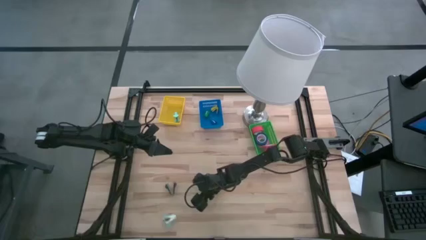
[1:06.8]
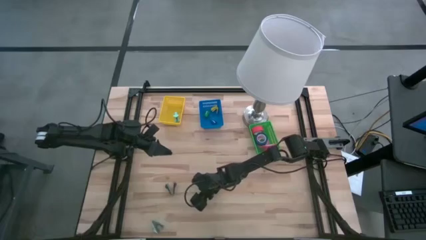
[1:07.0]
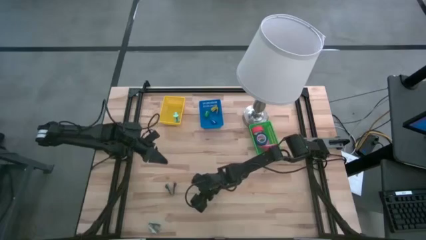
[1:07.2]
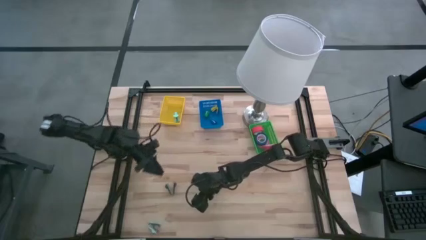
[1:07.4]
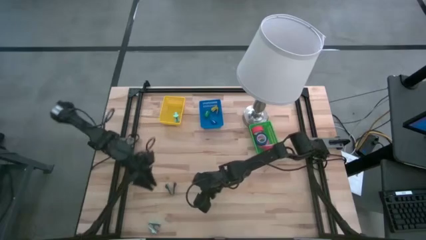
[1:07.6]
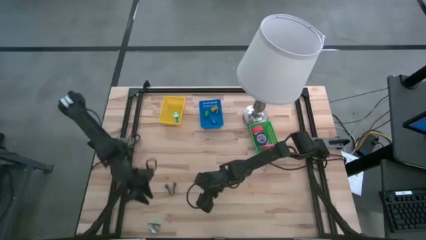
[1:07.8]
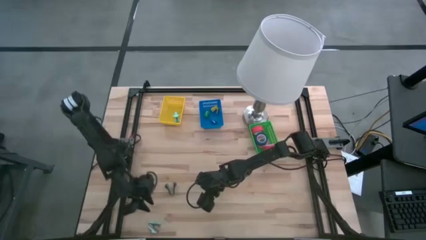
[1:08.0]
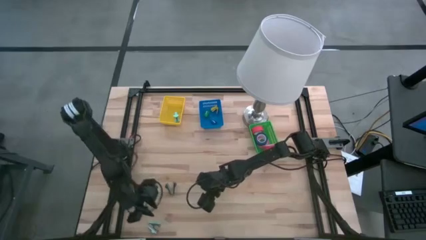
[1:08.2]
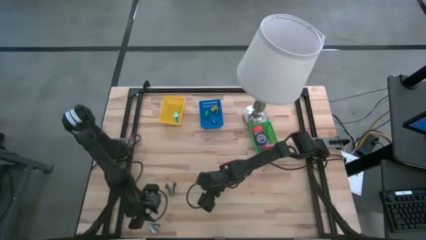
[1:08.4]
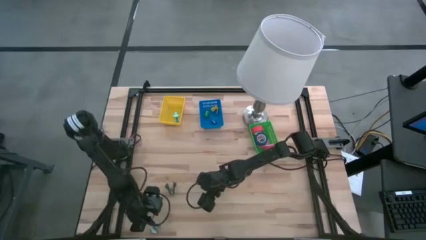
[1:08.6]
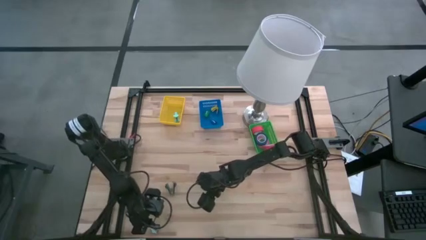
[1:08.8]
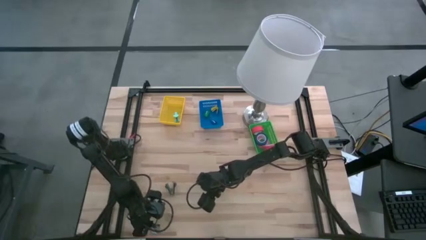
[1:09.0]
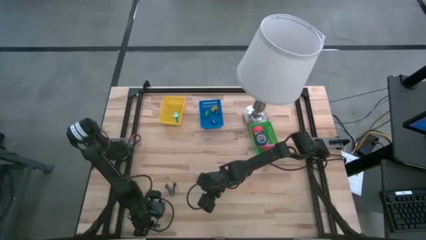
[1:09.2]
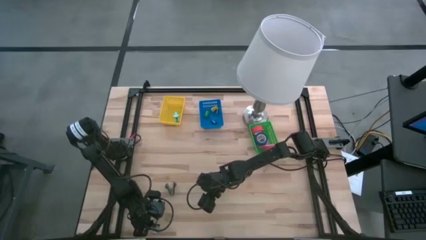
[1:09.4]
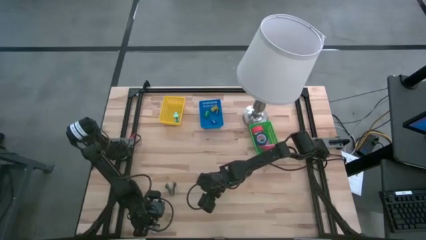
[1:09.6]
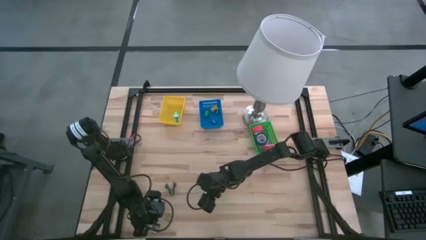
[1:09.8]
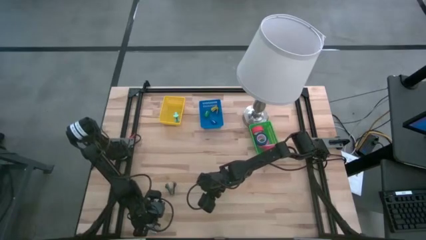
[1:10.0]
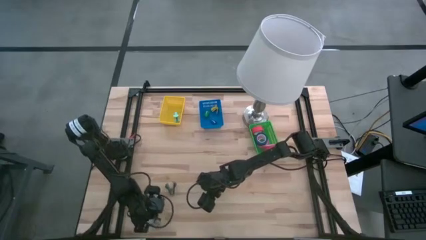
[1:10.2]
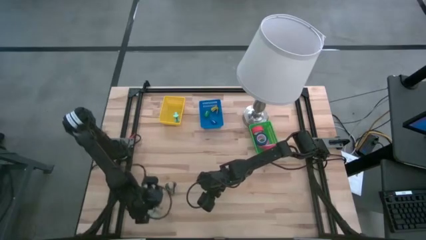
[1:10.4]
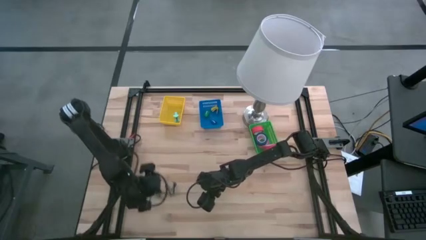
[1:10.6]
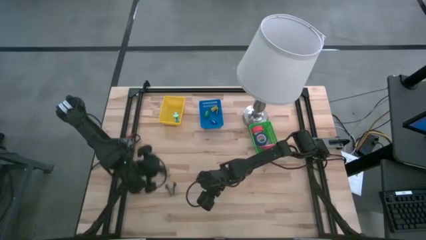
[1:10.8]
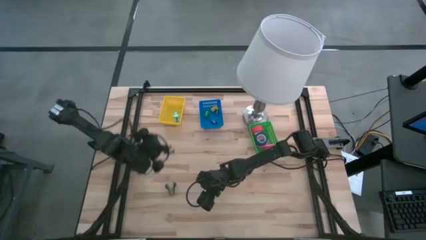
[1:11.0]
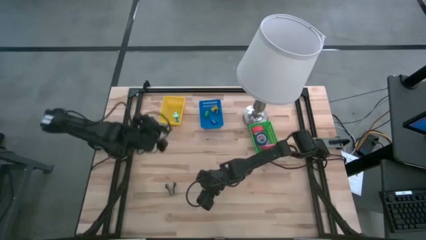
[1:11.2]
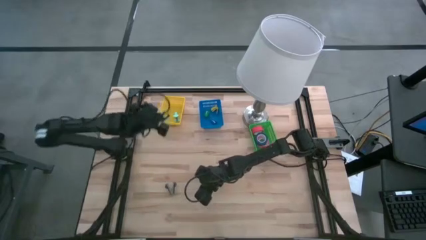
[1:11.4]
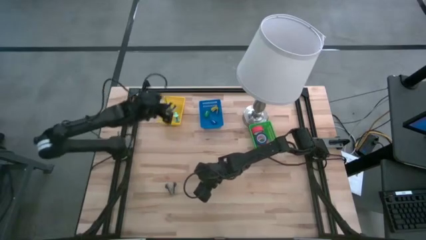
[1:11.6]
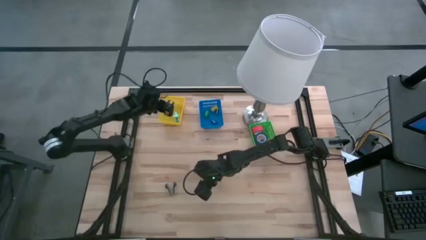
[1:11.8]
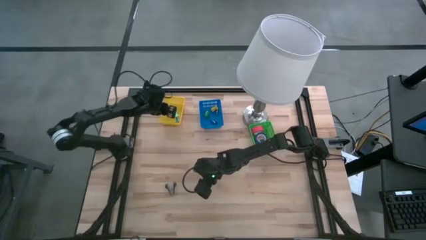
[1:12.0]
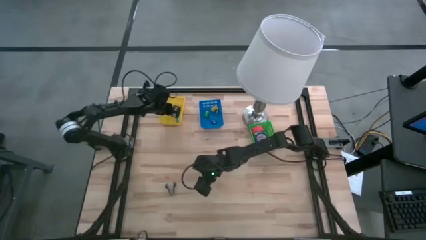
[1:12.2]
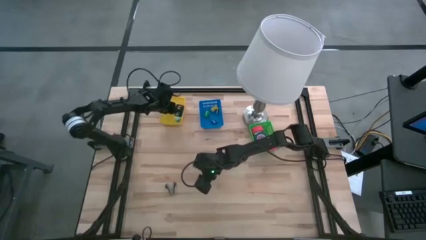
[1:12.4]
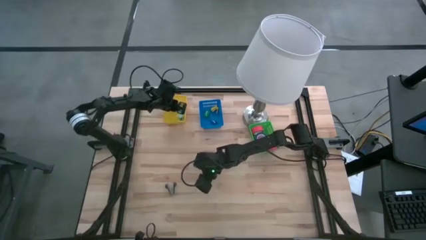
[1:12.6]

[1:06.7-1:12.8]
Task: Pick and place Stapler, Stapler remover, tape
Put the light blue green staple remover into the yellow bin

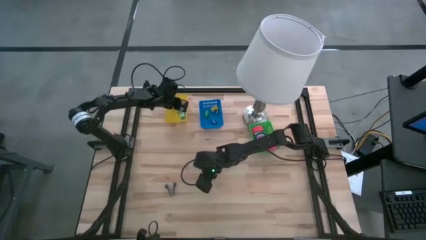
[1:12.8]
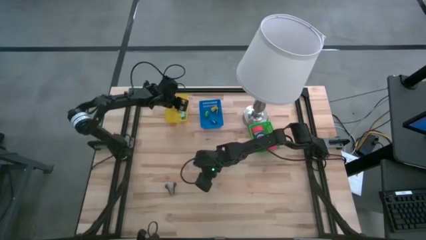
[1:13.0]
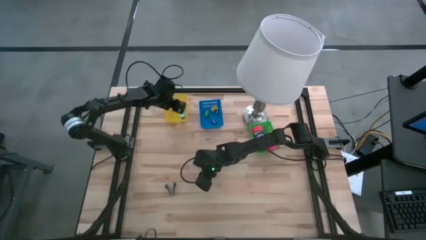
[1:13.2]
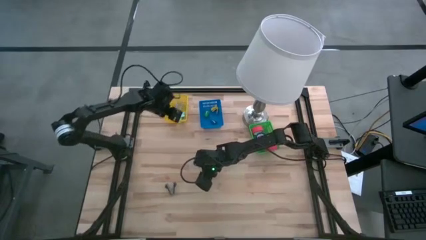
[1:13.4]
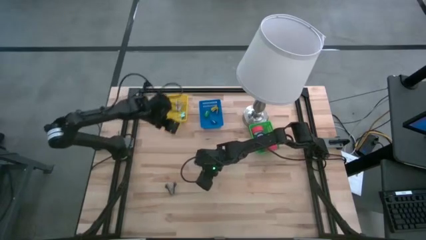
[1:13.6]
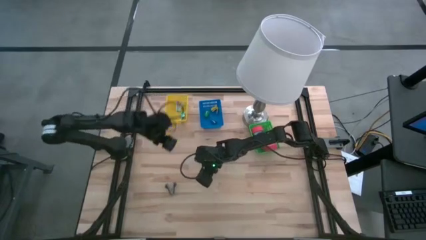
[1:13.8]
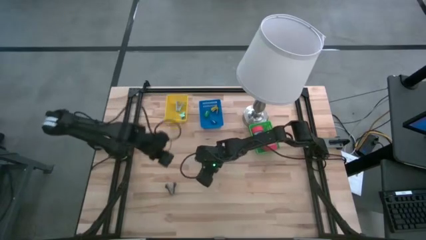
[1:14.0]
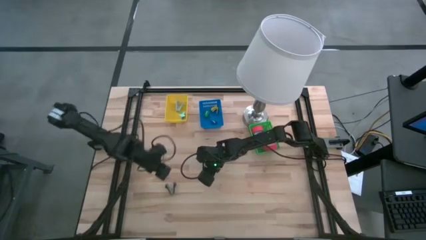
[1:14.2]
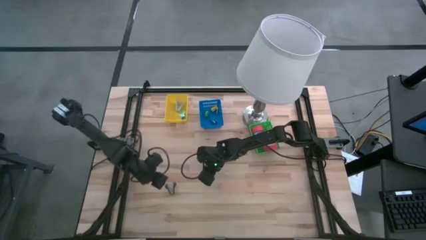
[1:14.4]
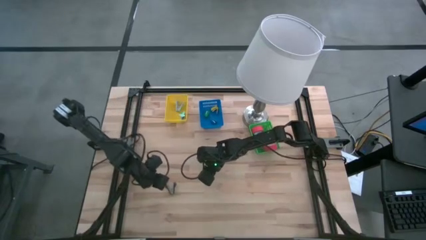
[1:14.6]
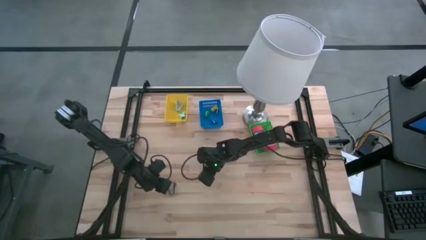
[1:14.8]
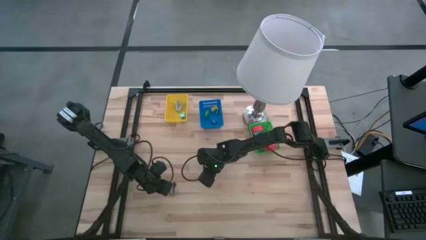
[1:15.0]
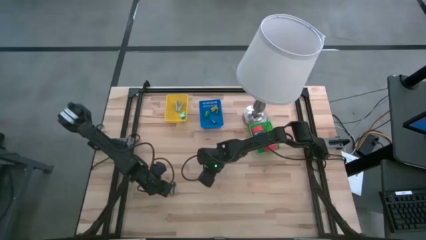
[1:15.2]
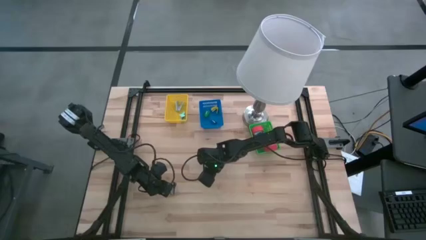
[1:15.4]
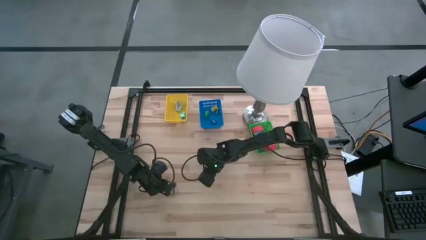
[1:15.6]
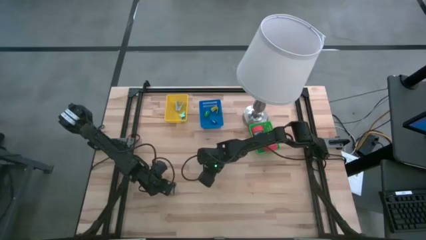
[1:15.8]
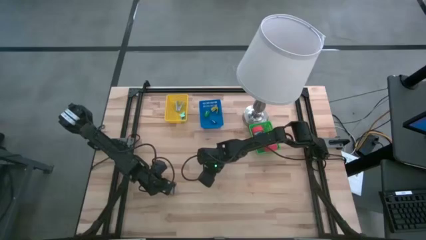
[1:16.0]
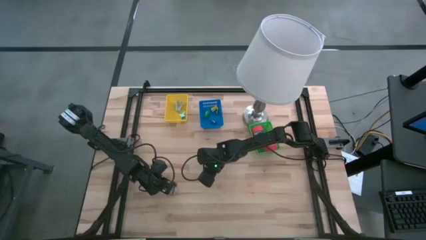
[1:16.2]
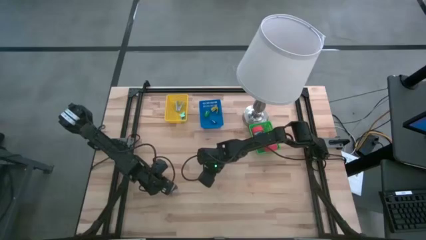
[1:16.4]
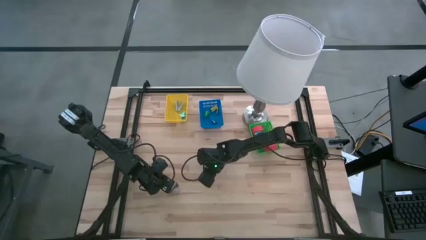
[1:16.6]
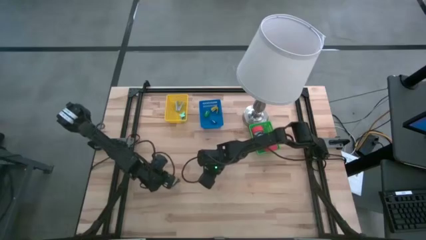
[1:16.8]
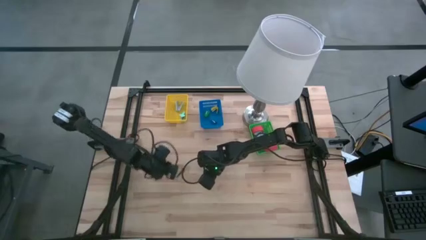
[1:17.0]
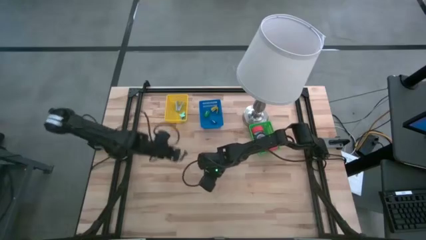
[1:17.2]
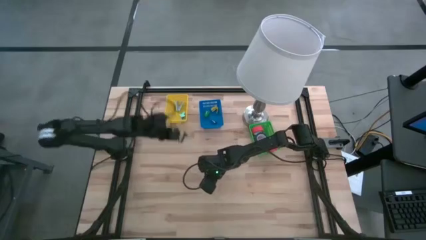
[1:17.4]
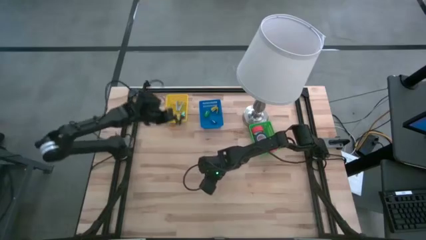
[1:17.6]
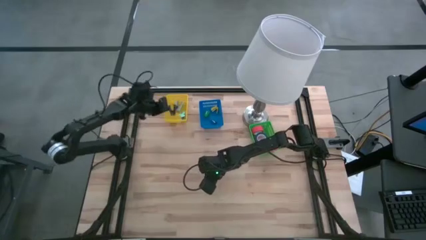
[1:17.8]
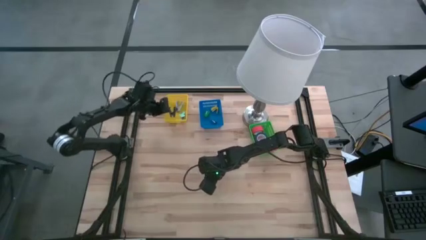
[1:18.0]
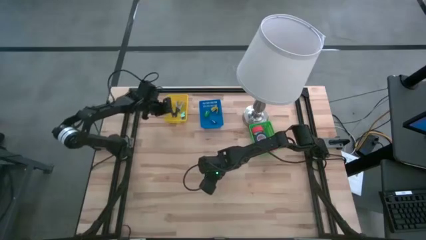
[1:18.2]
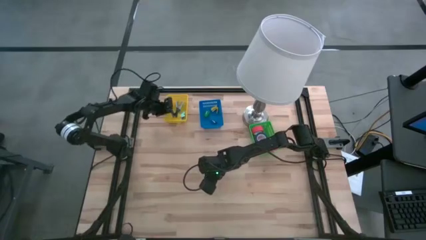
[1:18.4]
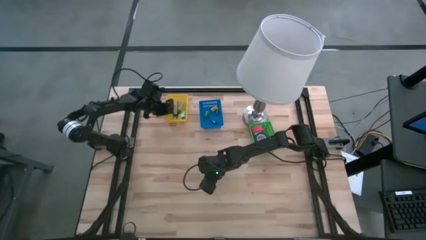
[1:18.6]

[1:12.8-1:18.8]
Put the black staple remover into the yellow bin
